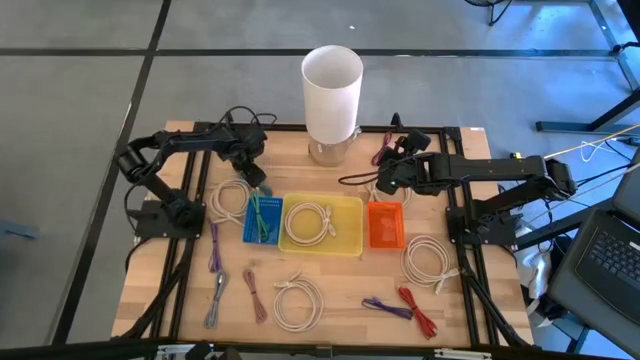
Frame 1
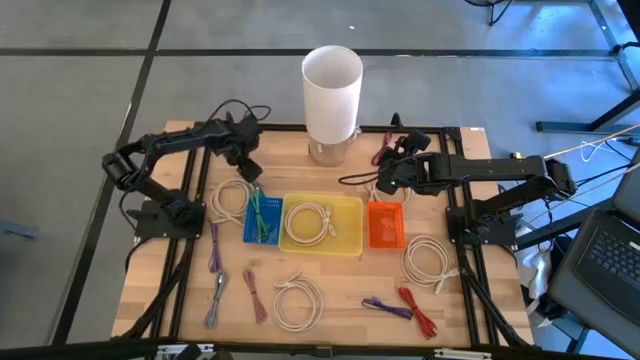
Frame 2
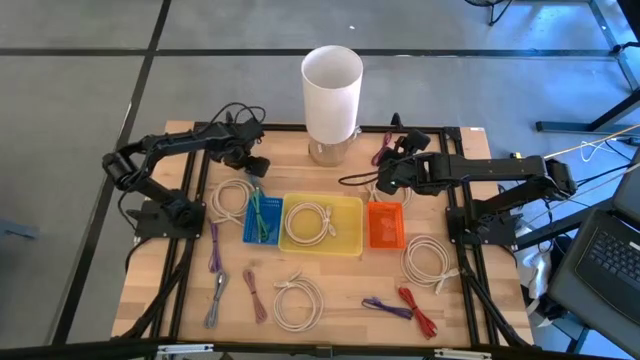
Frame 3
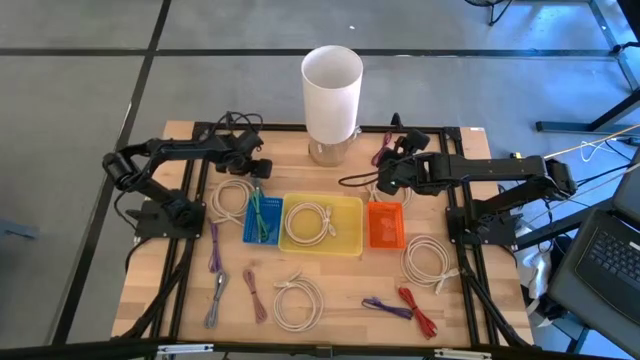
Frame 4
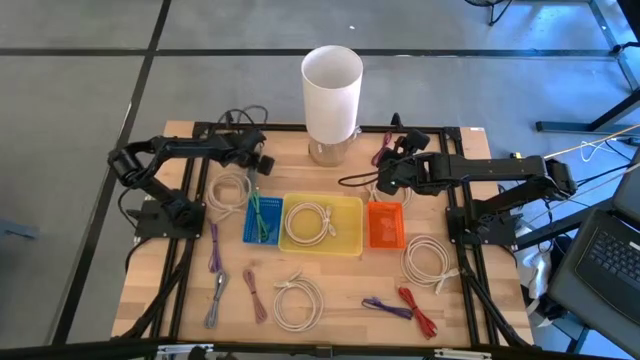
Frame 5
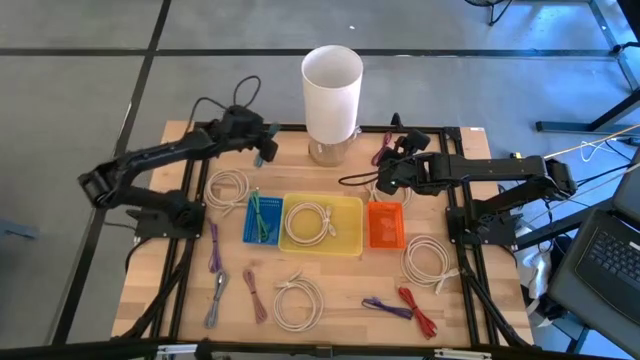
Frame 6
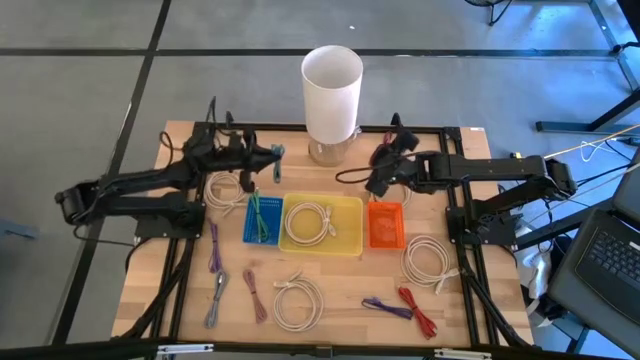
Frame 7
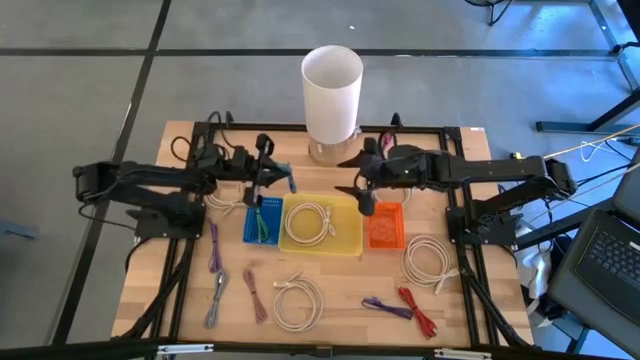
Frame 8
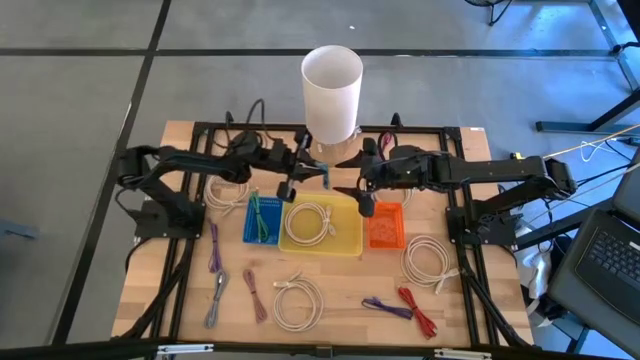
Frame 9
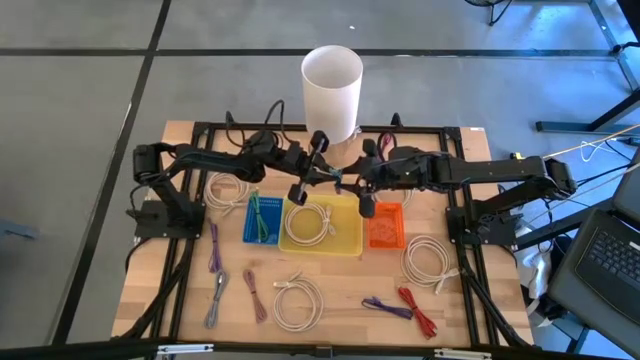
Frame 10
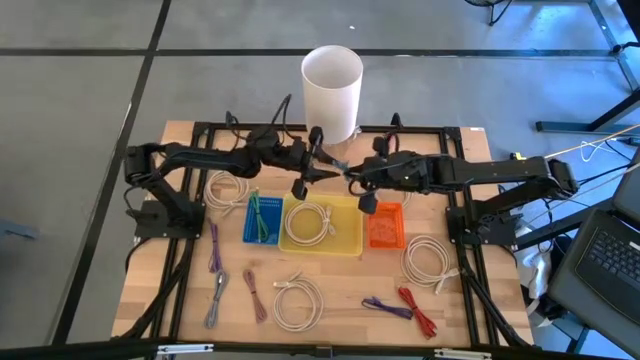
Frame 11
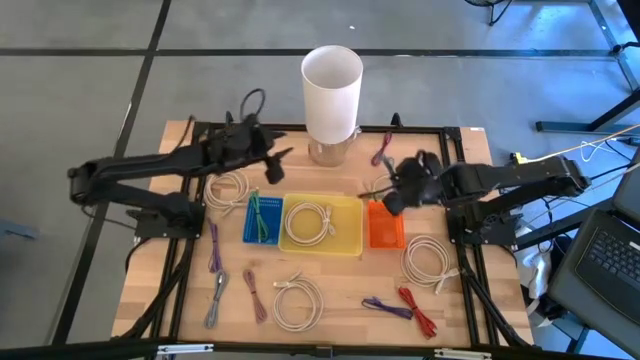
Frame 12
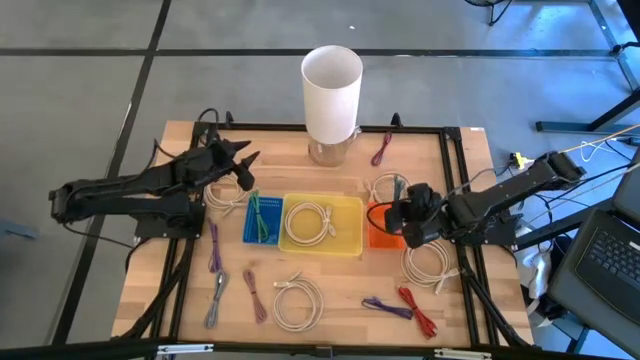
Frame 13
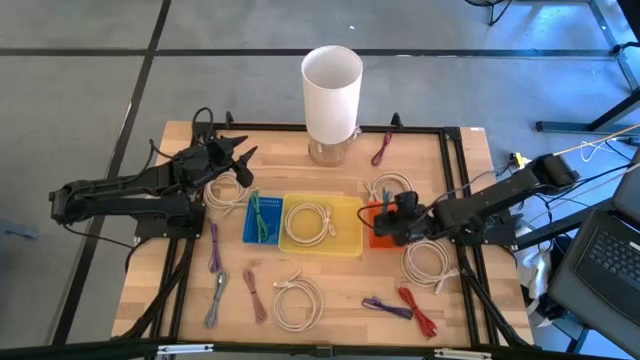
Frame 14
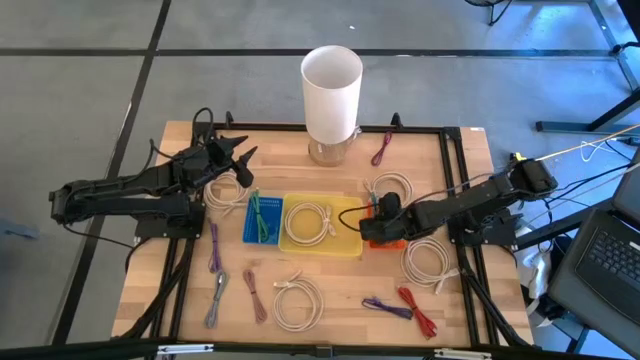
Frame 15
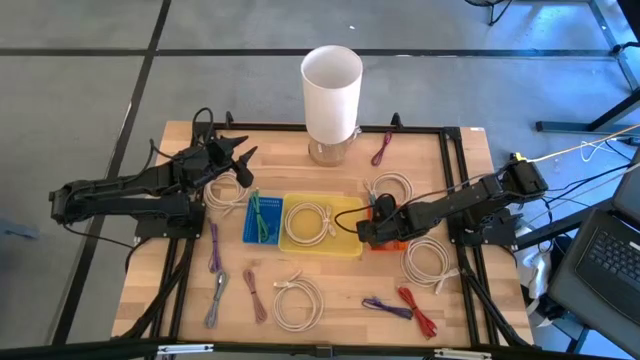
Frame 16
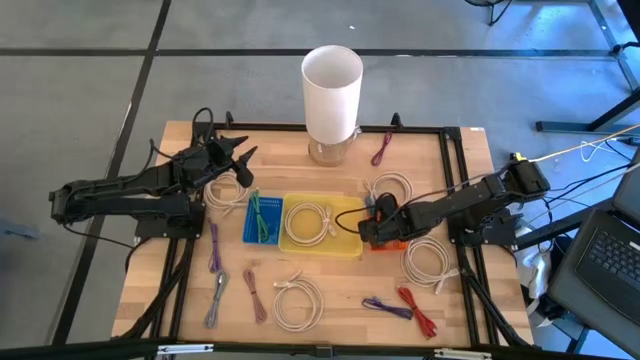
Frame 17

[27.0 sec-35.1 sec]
Task: Pick & Place USB Port
Put the blue patterned USB cable into the orange bin

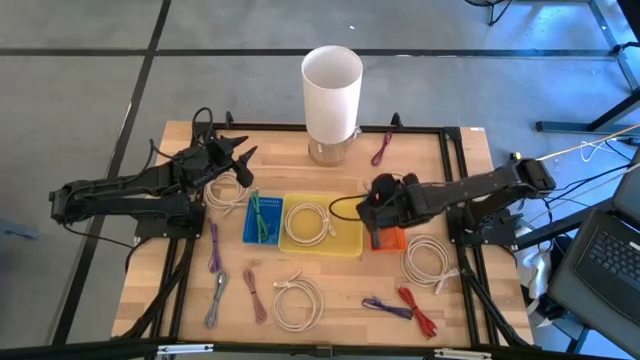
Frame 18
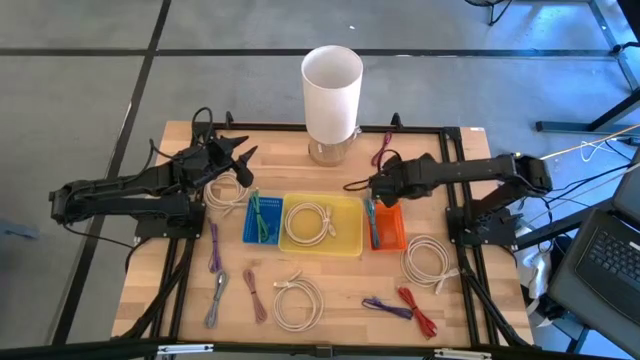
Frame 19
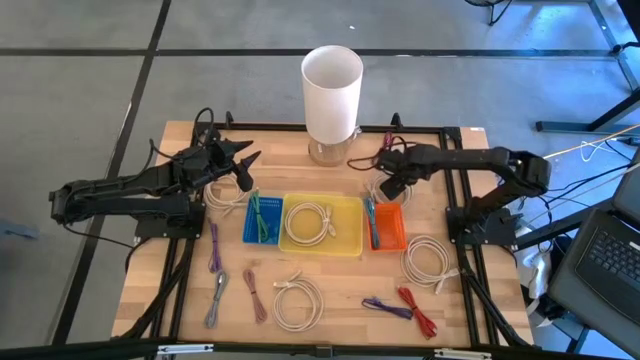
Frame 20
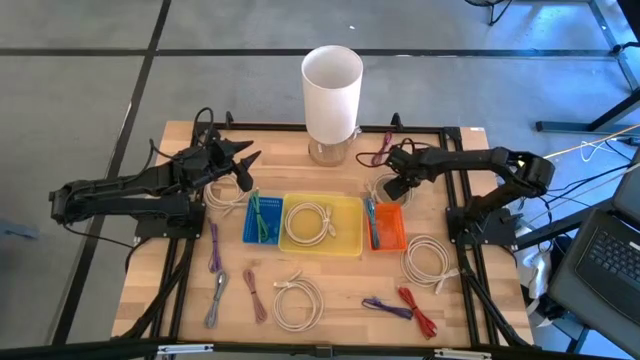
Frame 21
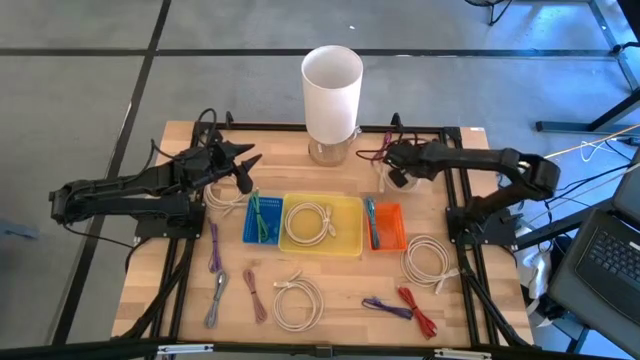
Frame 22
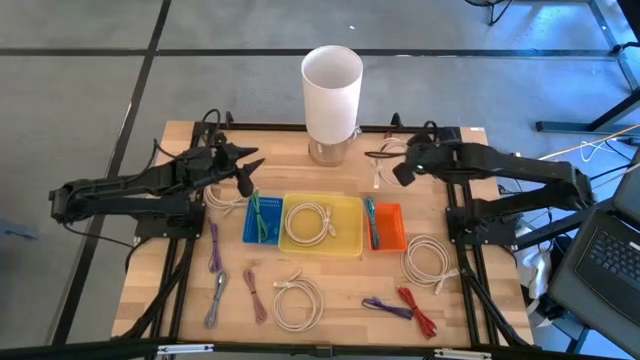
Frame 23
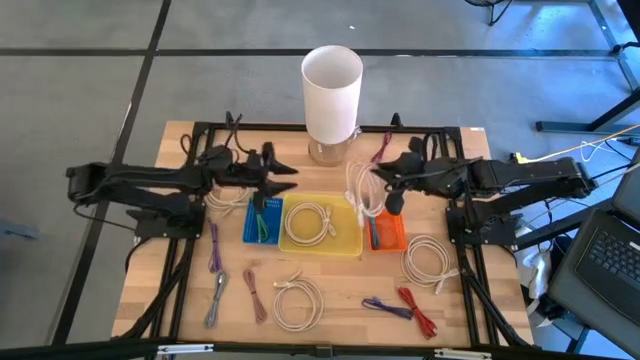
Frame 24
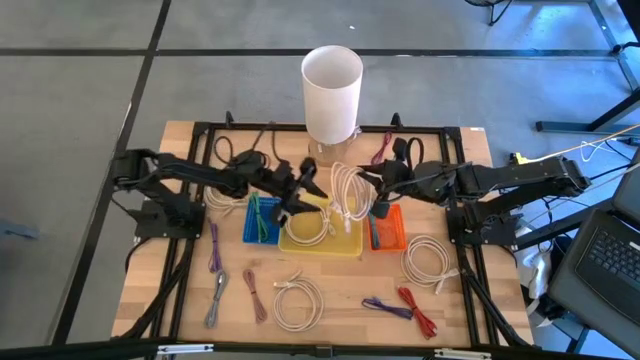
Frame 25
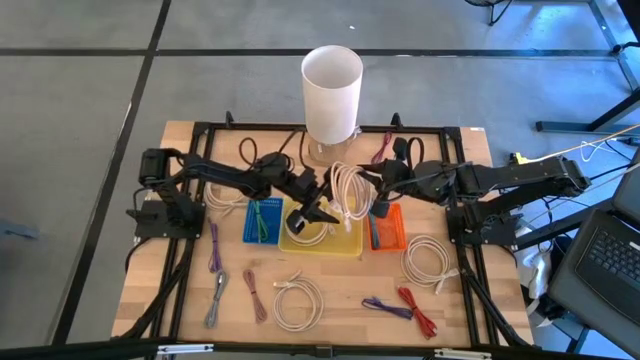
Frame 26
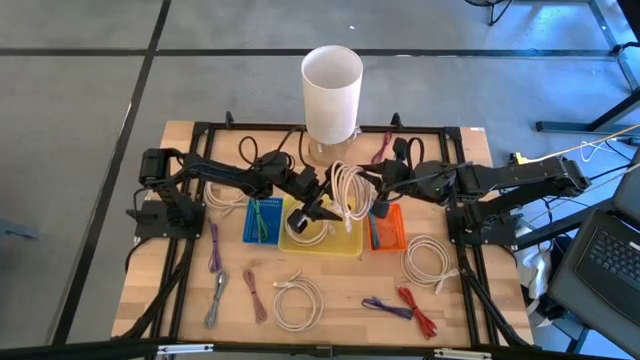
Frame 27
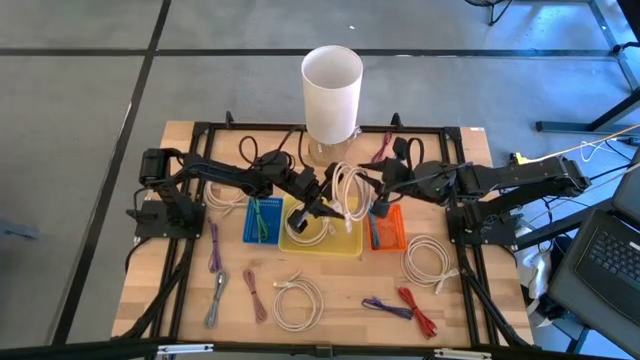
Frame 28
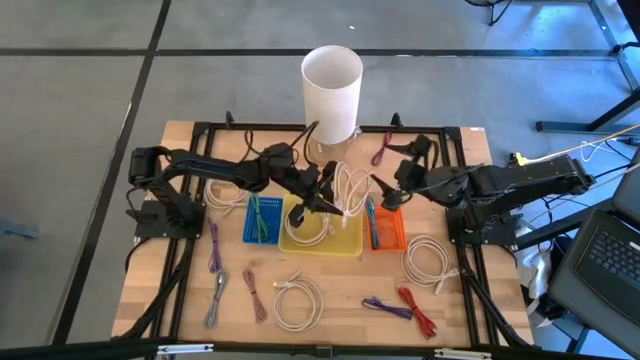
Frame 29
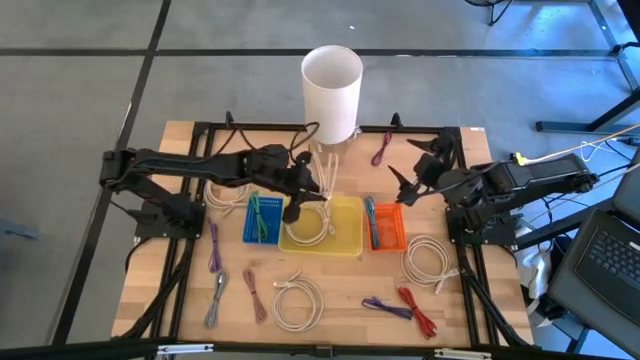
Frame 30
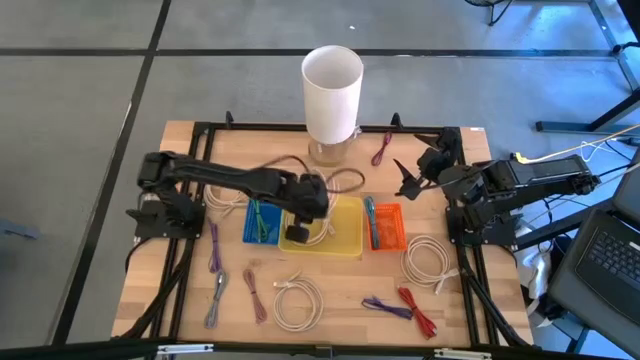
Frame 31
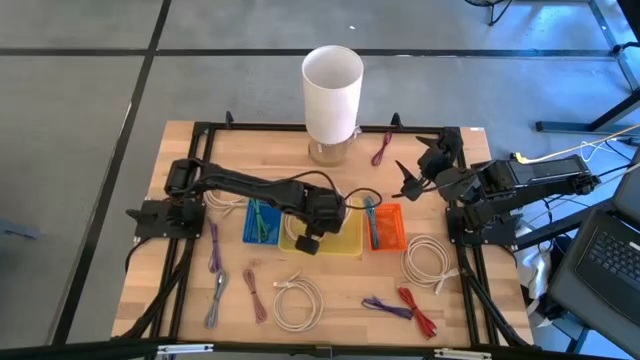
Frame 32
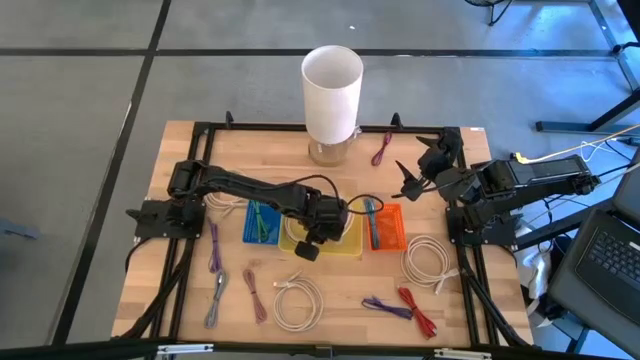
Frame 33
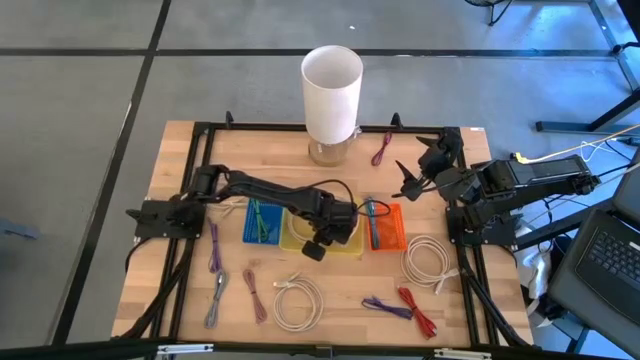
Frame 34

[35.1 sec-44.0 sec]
Put the light brown HDMI cable into the yellow bin

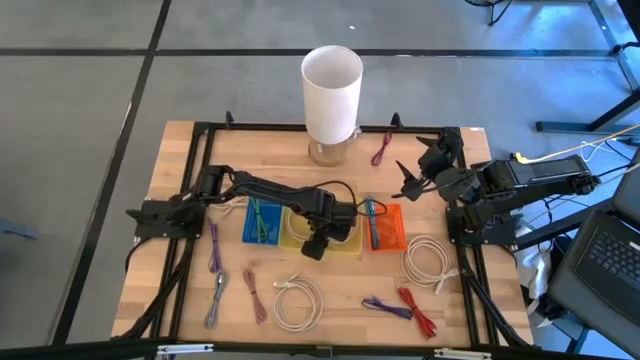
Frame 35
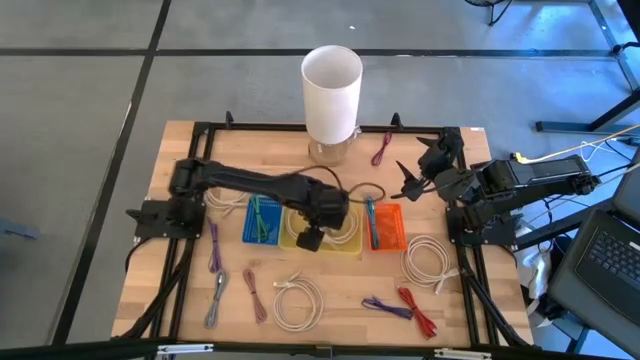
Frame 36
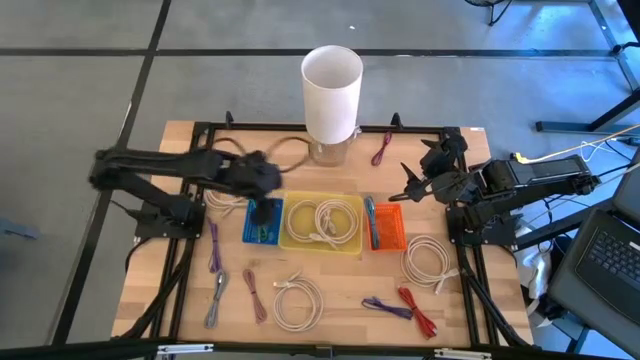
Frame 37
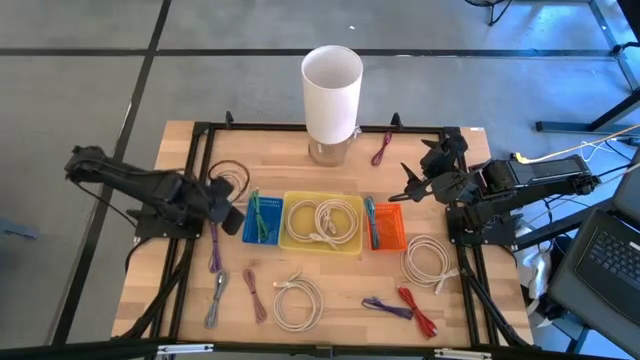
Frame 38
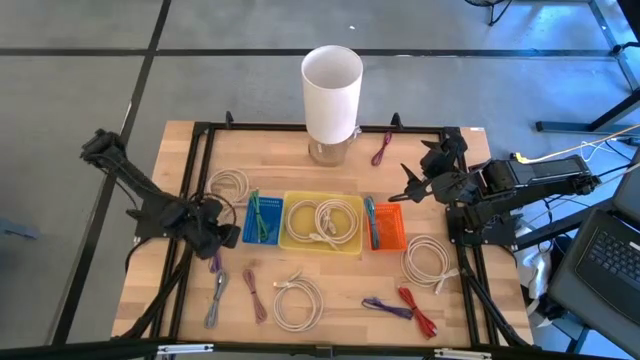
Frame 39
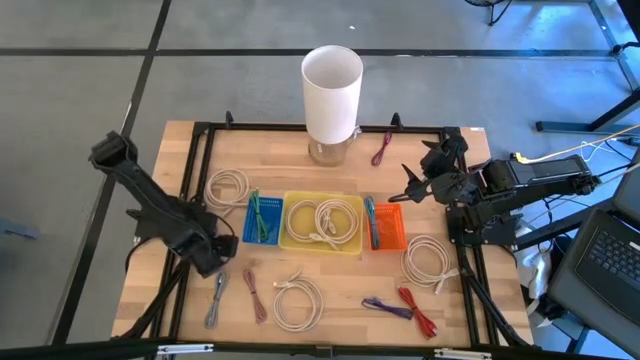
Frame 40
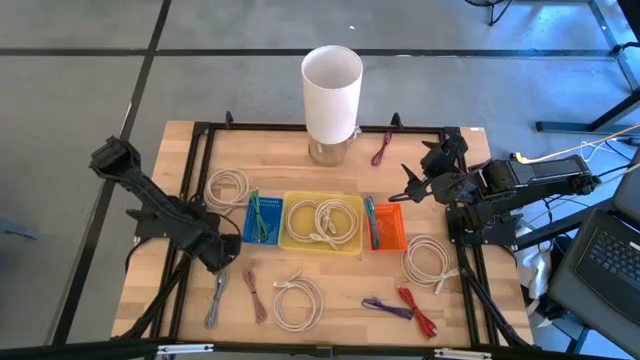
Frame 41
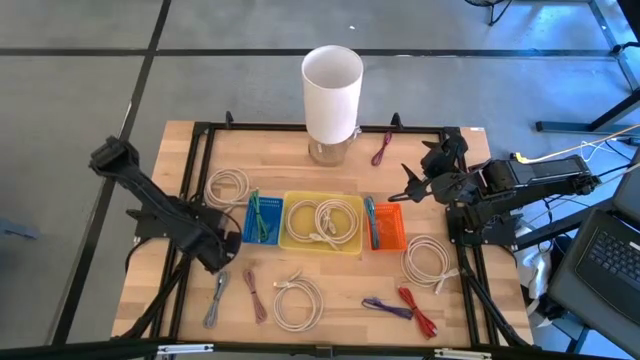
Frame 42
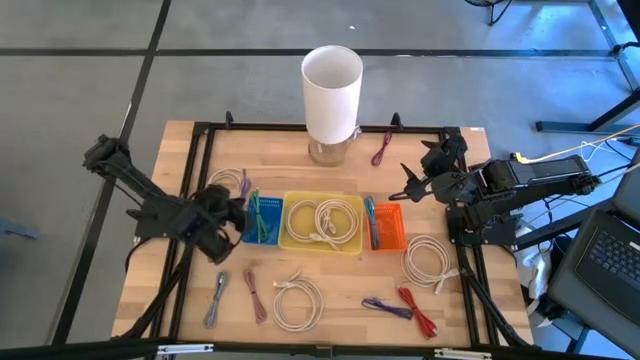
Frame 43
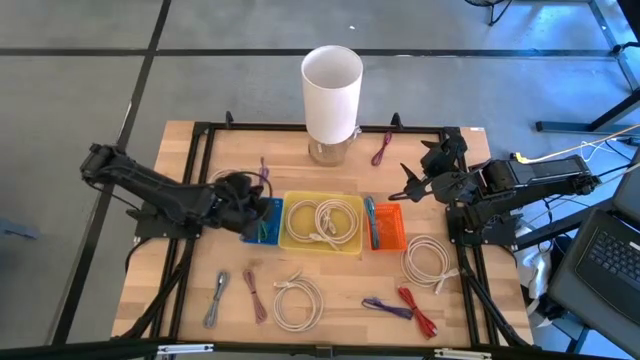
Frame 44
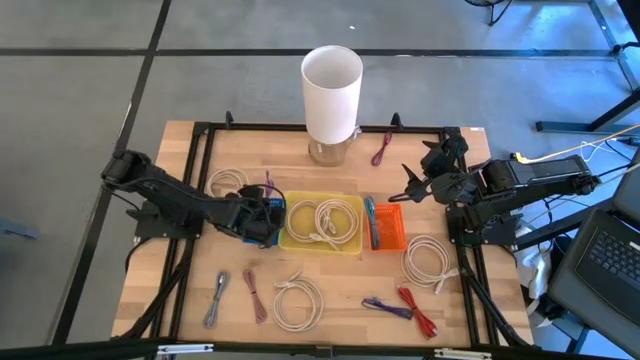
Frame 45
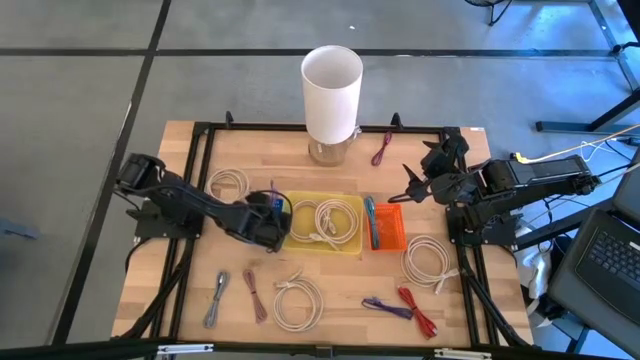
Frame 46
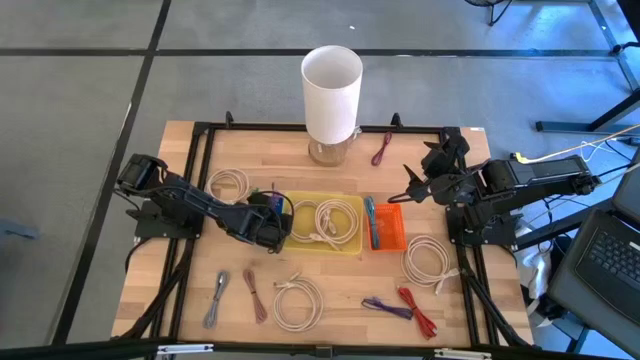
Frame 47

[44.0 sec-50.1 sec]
Put the violet USB cable into the blue bin
